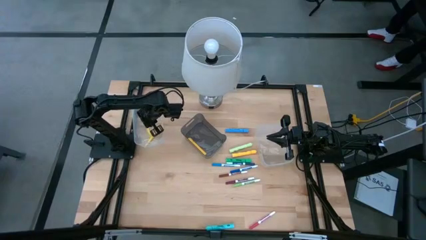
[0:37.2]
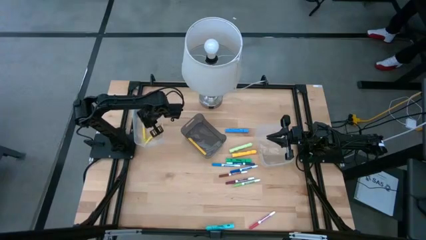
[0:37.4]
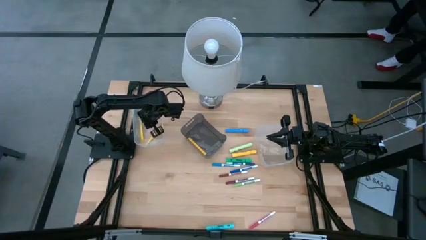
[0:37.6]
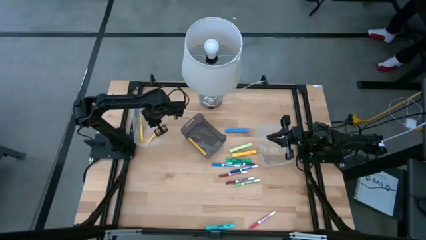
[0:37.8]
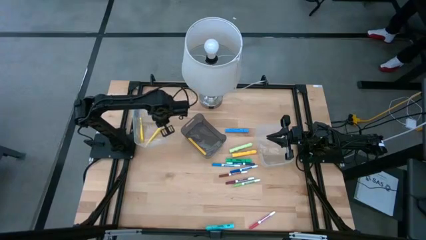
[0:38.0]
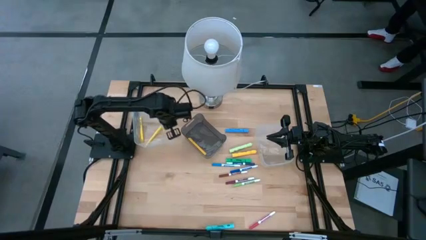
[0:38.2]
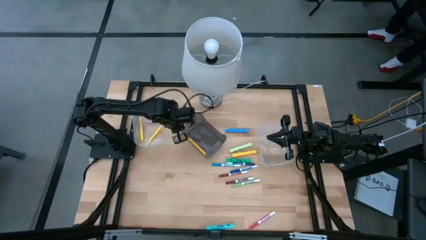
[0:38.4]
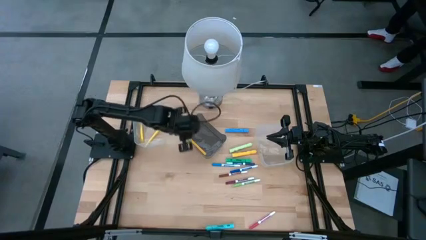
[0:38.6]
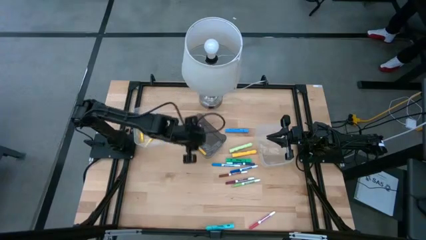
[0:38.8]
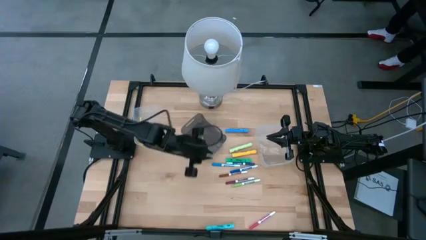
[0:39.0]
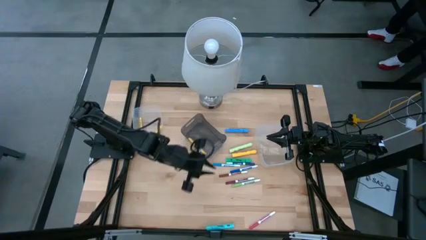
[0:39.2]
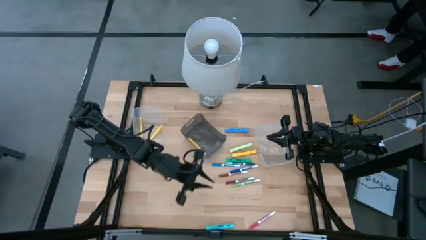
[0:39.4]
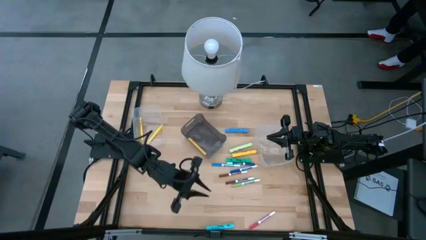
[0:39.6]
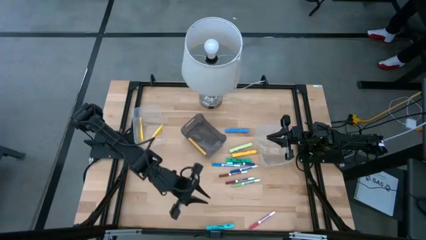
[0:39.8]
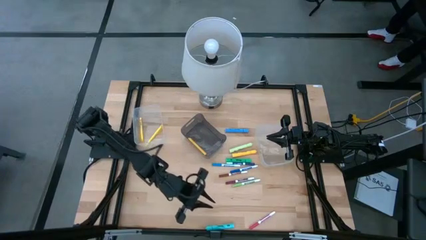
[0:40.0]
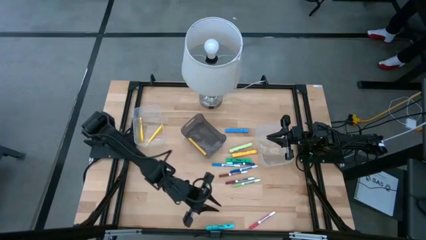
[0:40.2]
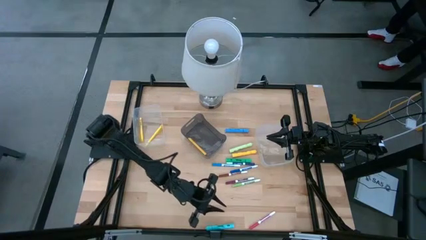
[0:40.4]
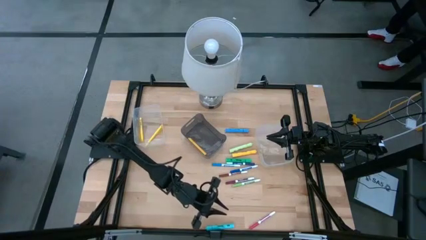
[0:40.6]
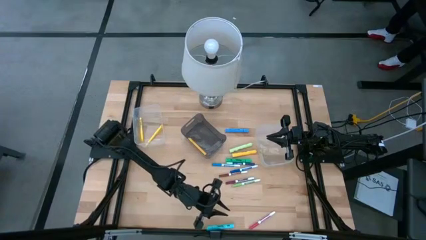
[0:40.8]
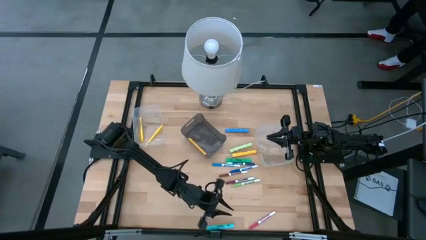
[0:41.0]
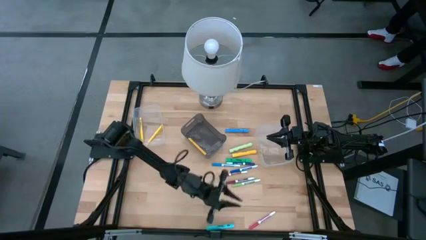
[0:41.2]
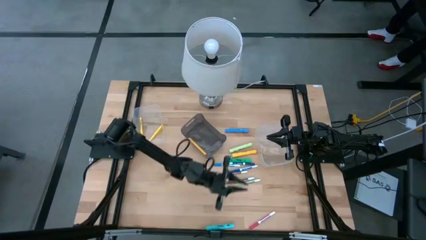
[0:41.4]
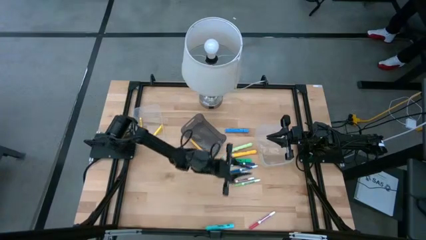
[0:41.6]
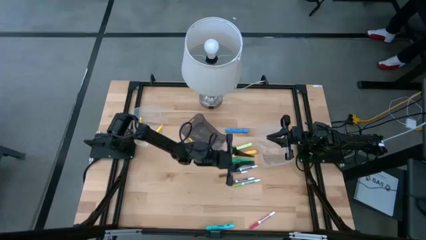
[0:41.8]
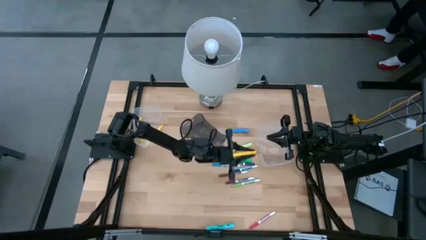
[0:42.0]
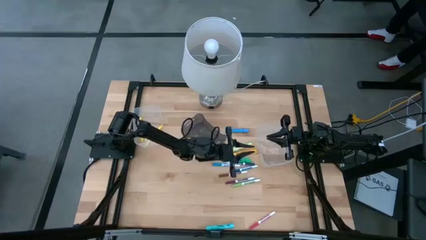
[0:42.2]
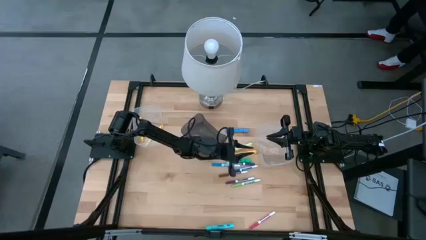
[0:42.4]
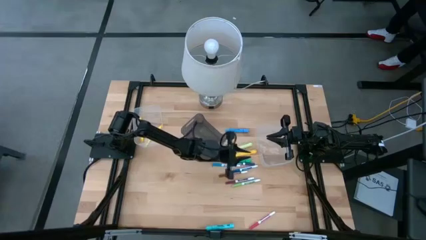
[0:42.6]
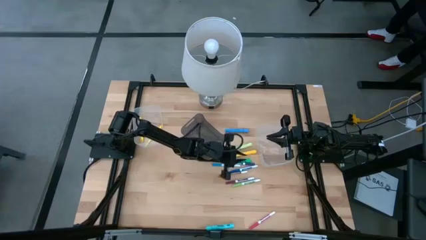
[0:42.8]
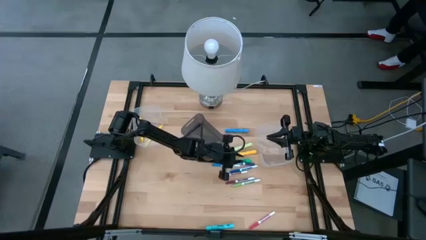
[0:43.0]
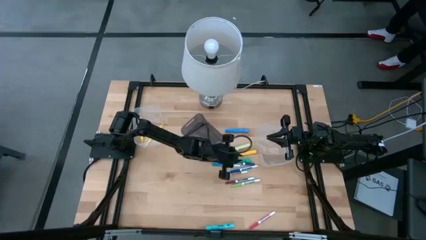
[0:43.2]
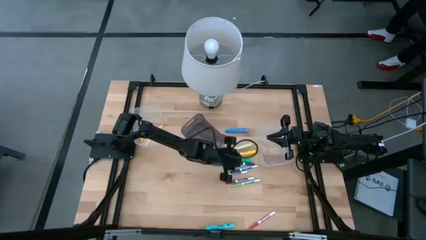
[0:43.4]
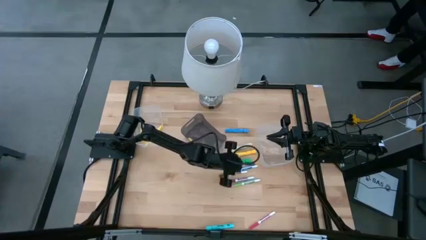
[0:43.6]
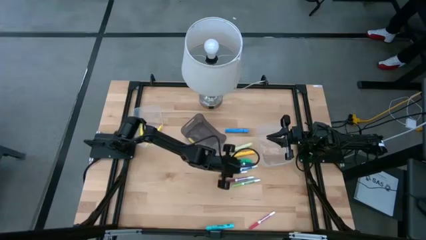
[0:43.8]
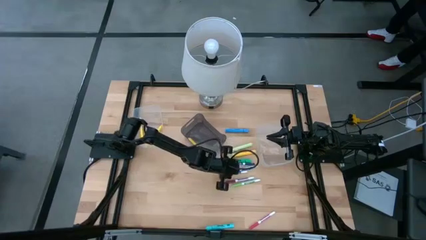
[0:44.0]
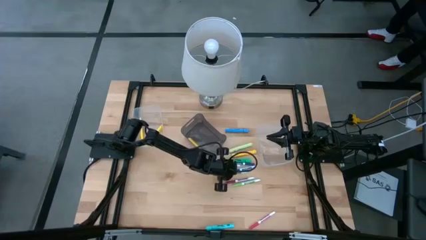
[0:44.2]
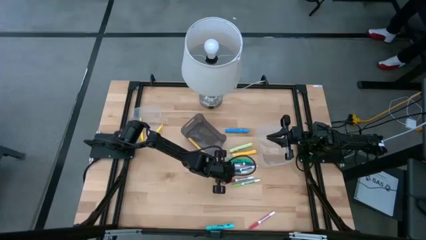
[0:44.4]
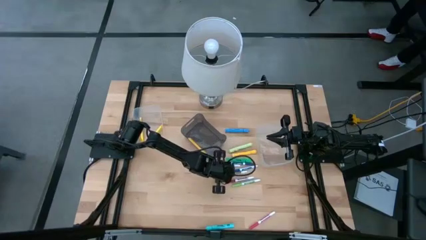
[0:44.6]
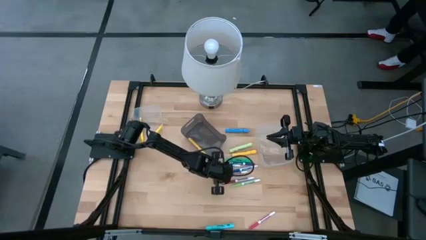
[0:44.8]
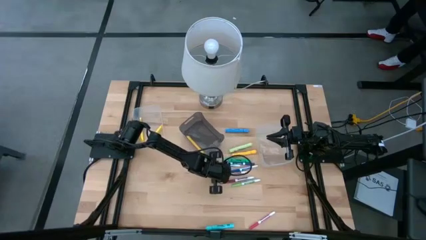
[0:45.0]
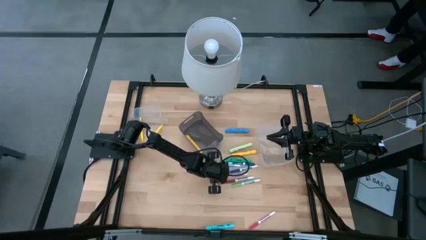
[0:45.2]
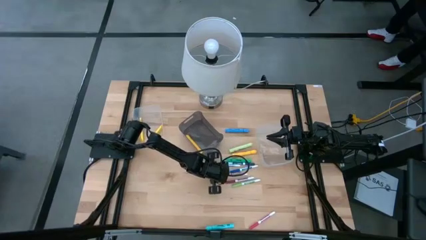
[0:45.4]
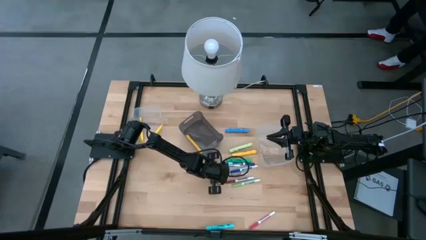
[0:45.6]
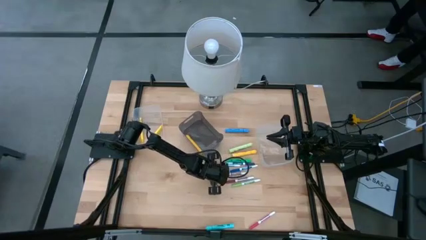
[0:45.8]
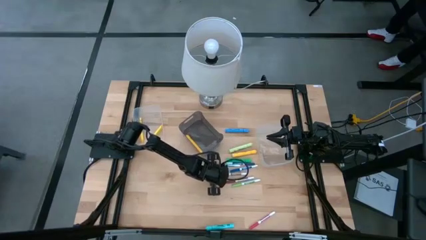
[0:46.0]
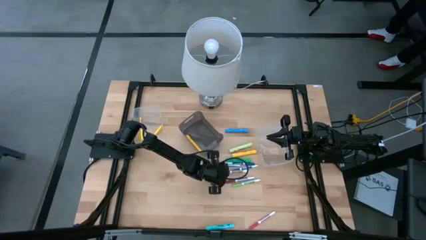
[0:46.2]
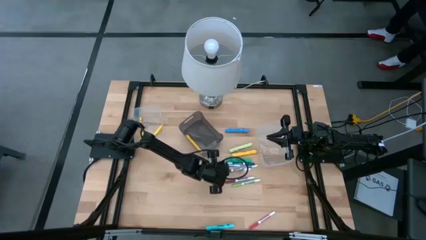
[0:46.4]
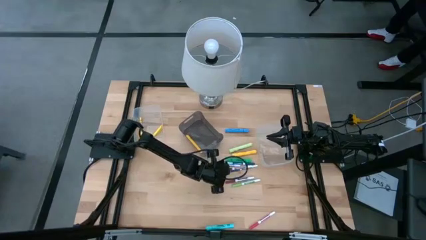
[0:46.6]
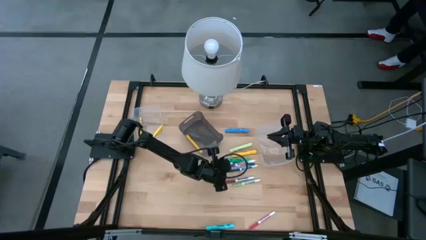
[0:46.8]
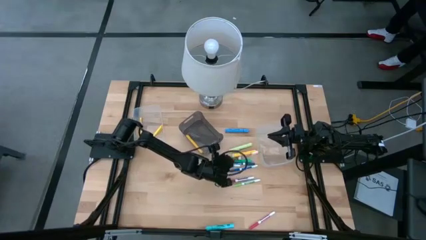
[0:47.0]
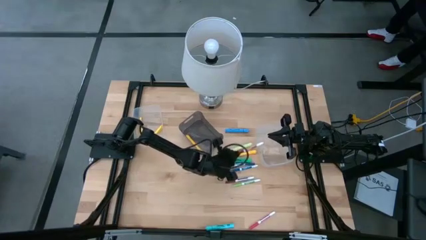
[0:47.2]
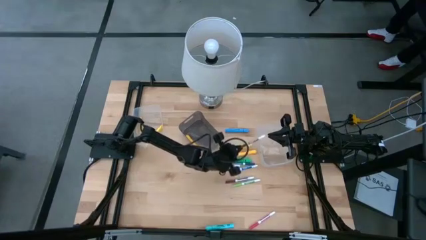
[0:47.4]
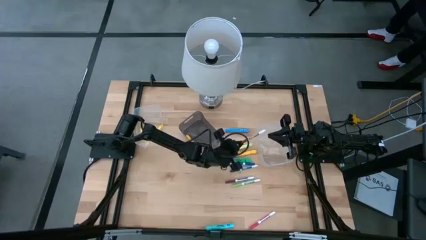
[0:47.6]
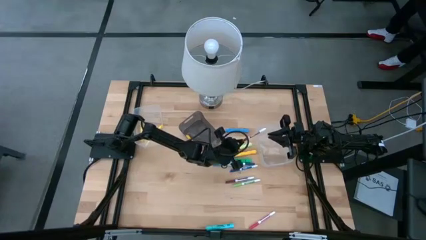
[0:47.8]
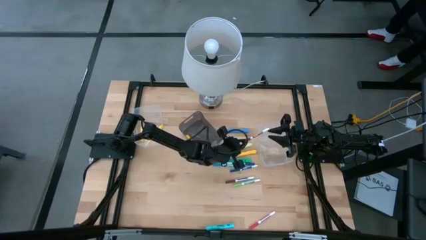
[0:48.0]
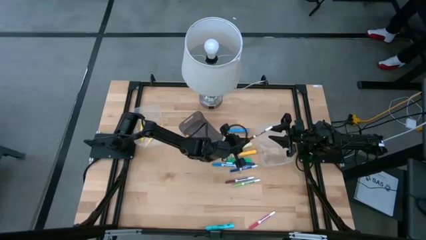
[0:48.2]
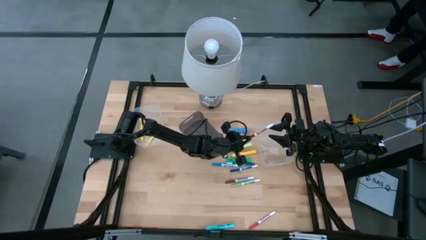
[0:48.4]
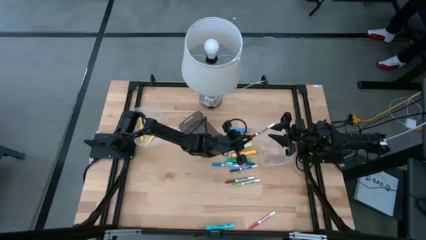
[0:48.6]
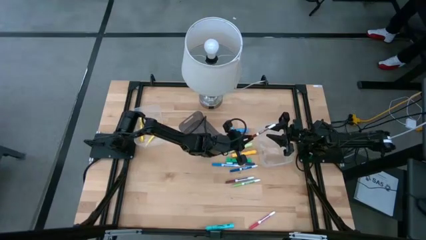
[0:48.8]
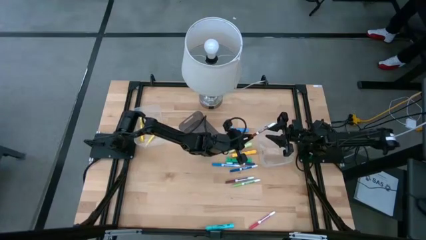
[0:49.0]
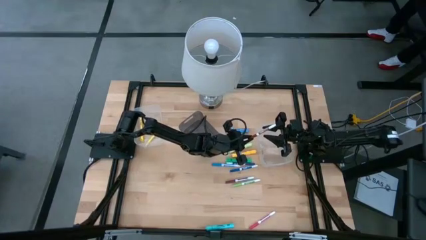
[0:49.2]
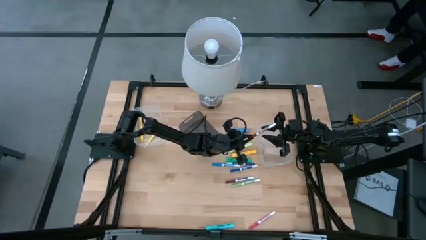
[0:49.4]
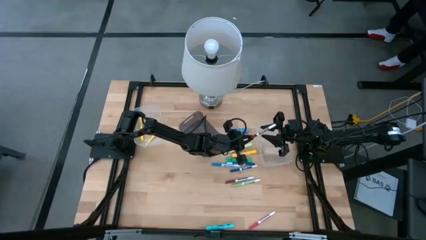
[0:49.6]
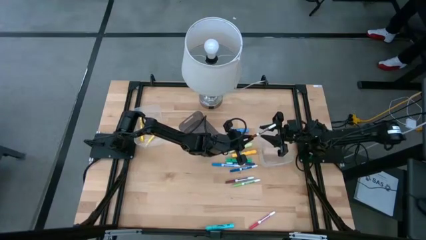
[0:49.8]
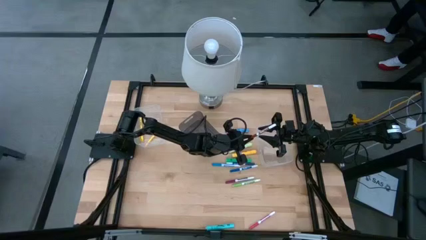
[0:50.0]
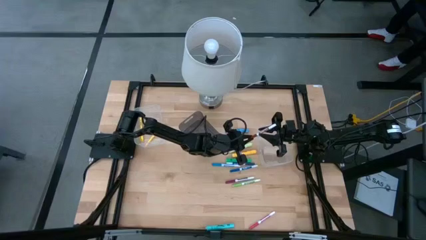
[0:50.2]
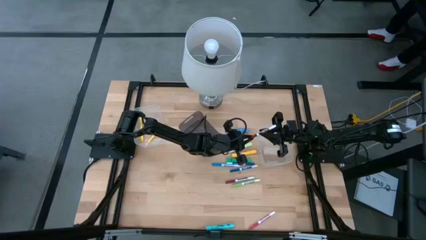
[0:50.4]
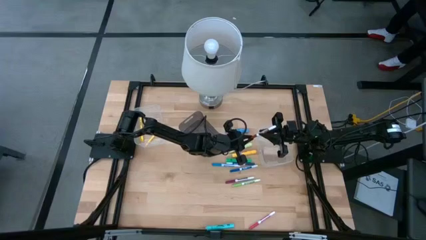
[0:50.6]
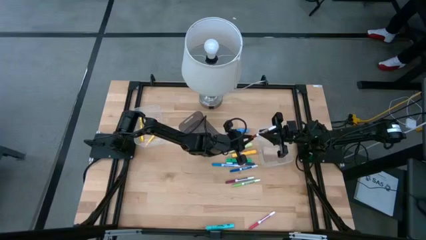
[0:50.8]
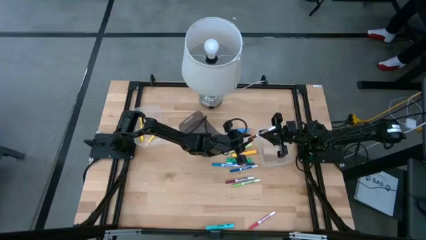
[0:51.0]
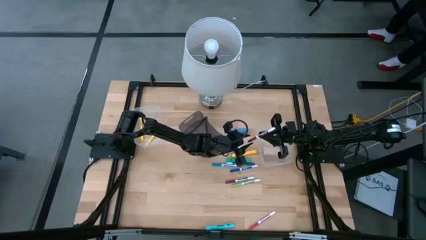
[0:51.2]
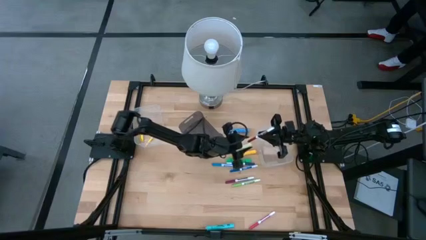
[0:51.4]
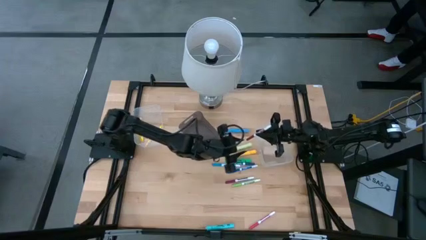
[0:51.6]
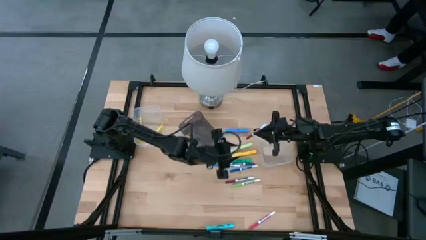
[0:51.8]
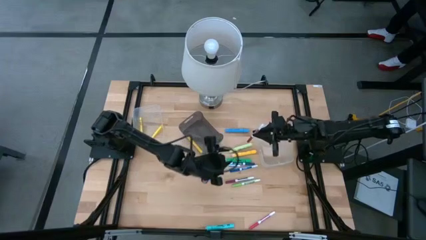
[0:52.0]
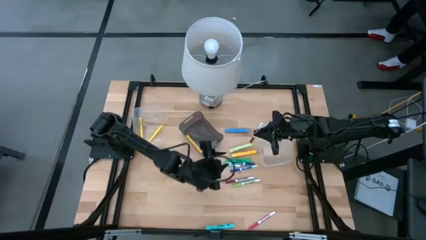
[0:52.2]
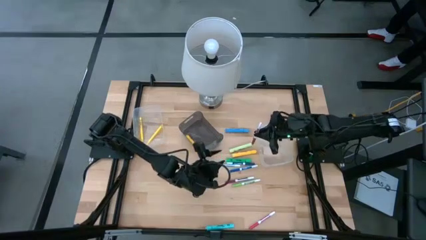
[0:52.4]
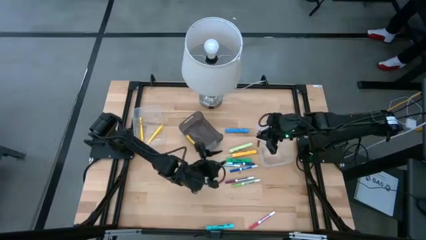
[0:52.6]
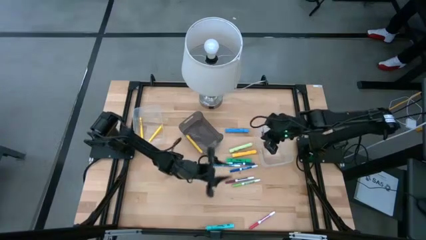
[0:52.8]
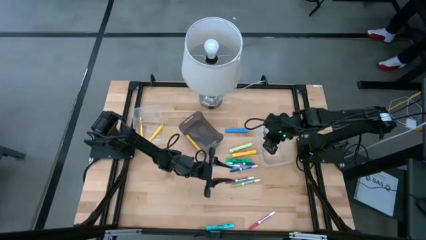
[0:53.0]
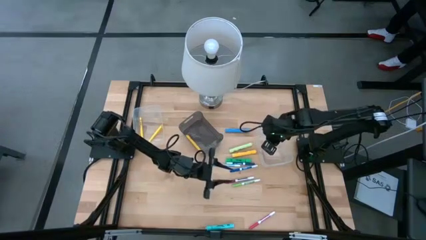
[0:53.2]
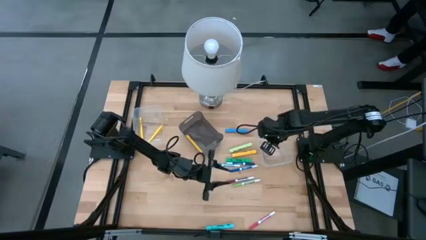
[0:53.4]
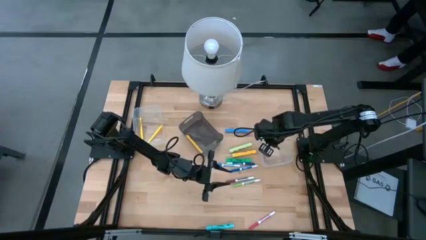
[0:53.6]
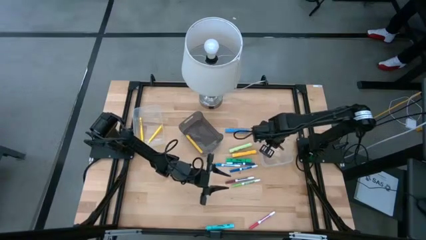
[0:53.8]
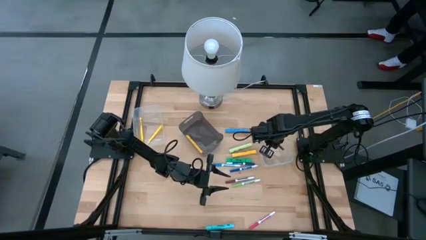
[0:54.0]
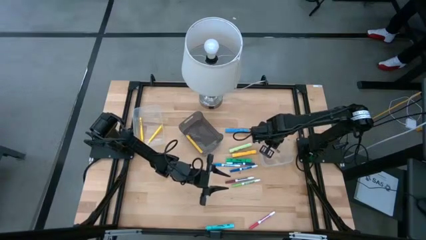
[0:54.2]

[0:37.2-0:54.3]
Task: Pick & Place Markers
Put the brown highlighter into the right transparent bin
